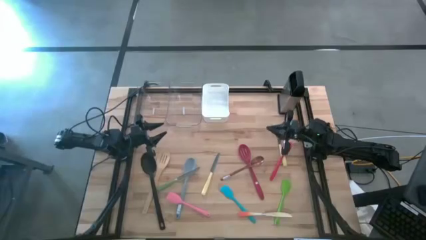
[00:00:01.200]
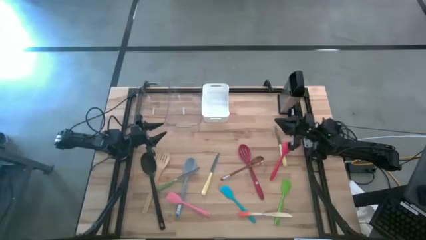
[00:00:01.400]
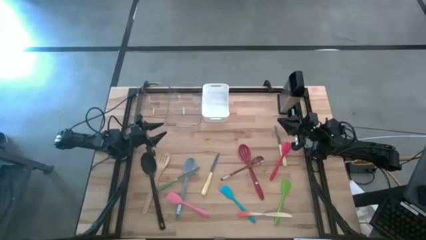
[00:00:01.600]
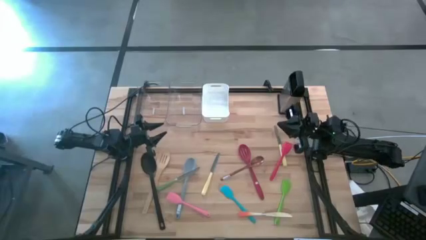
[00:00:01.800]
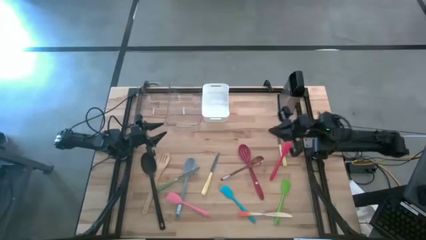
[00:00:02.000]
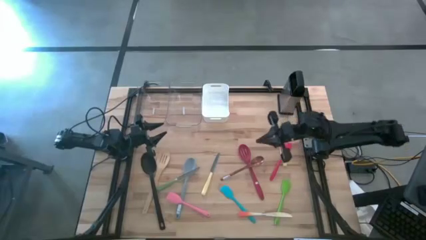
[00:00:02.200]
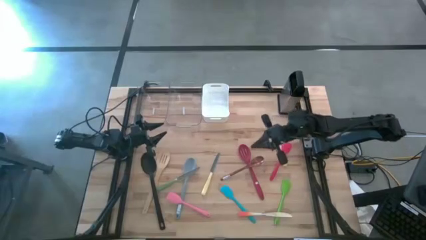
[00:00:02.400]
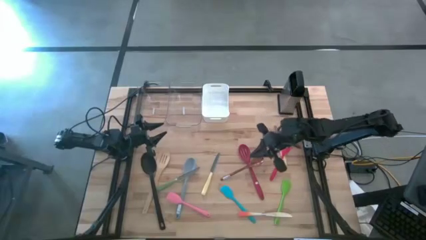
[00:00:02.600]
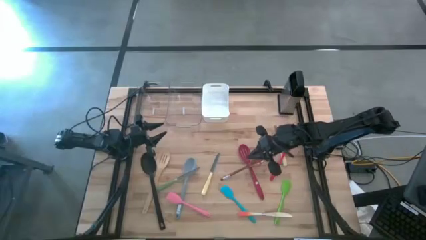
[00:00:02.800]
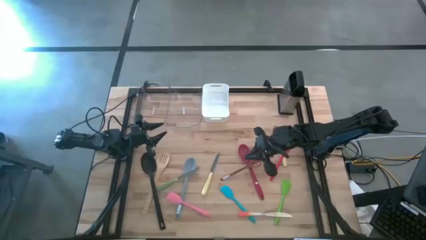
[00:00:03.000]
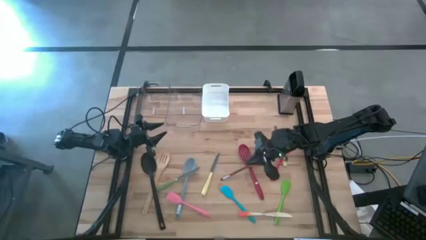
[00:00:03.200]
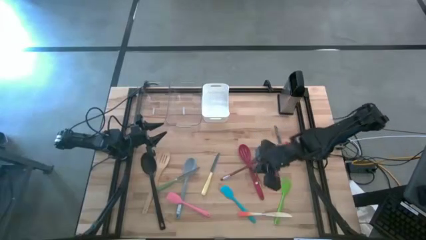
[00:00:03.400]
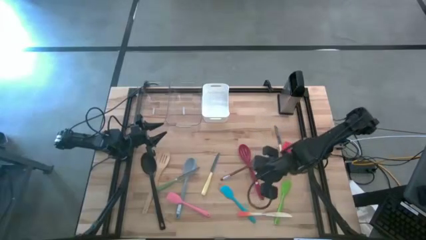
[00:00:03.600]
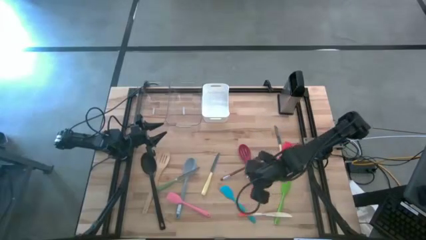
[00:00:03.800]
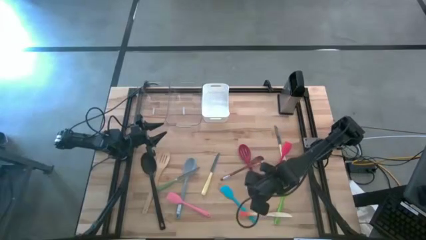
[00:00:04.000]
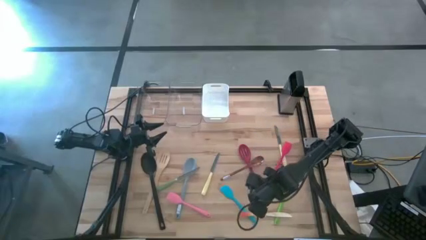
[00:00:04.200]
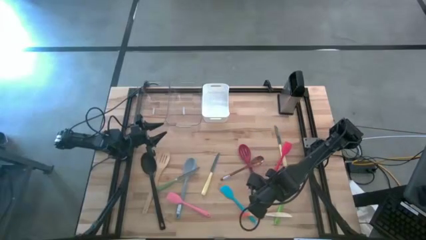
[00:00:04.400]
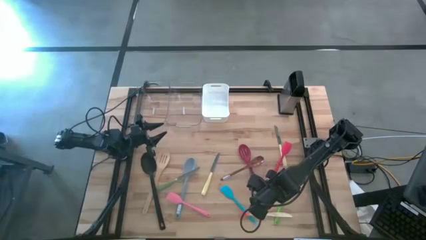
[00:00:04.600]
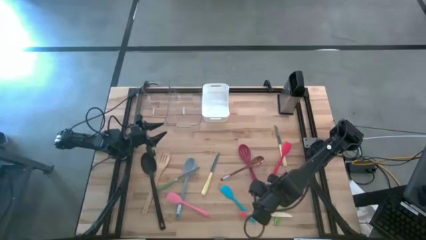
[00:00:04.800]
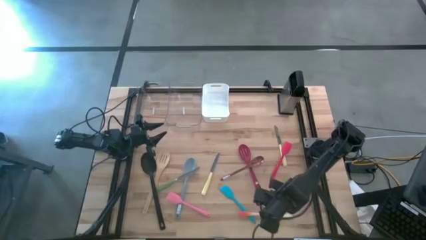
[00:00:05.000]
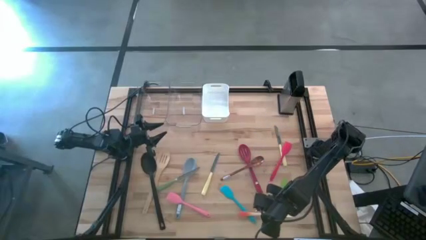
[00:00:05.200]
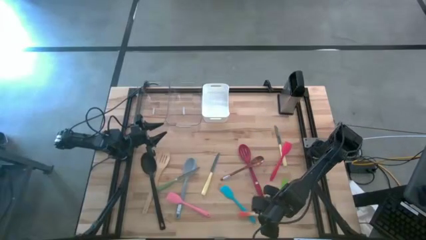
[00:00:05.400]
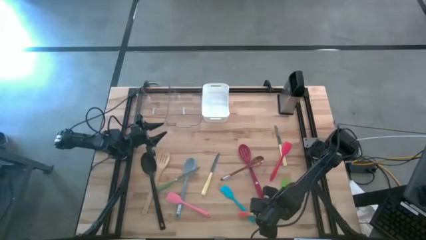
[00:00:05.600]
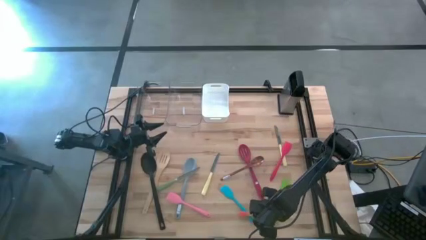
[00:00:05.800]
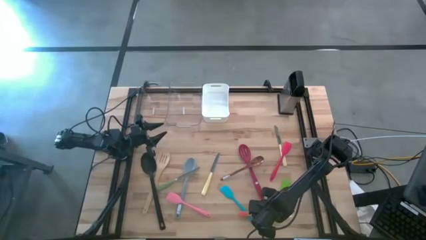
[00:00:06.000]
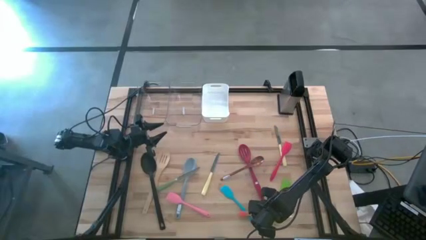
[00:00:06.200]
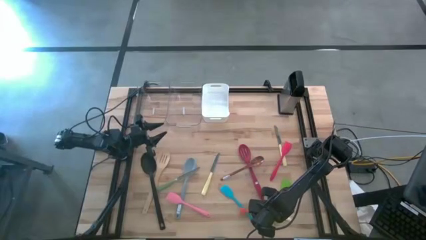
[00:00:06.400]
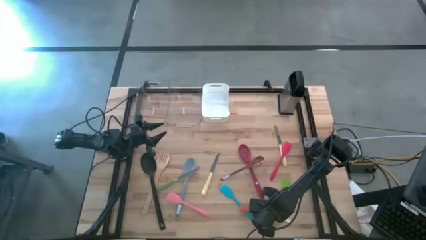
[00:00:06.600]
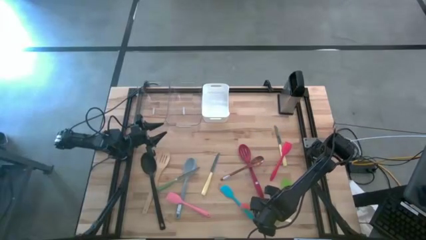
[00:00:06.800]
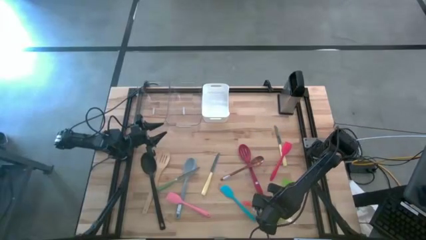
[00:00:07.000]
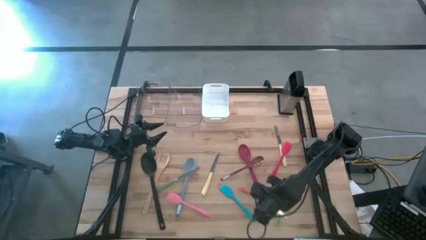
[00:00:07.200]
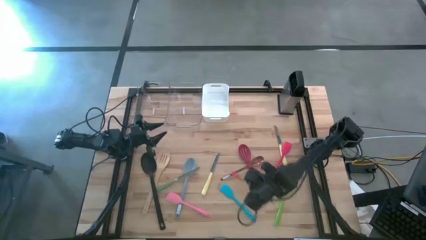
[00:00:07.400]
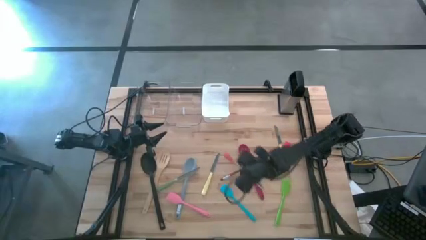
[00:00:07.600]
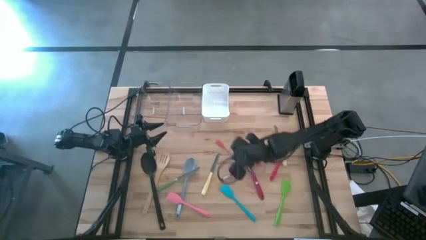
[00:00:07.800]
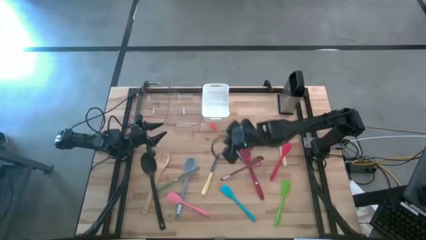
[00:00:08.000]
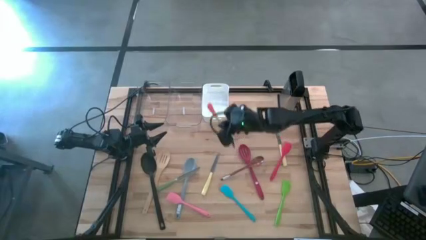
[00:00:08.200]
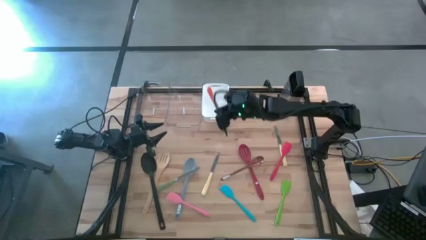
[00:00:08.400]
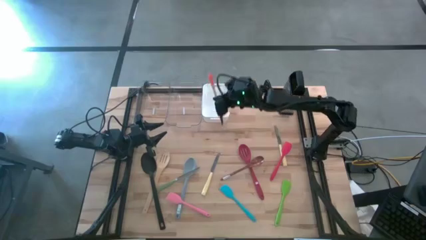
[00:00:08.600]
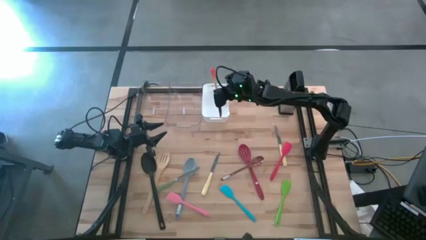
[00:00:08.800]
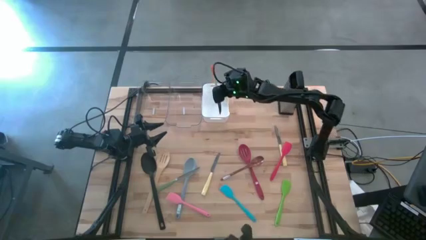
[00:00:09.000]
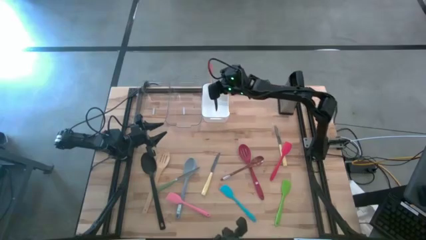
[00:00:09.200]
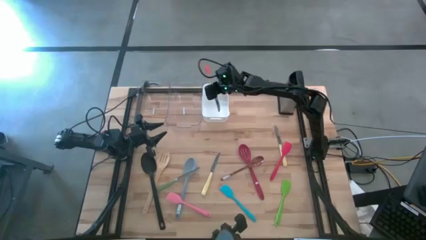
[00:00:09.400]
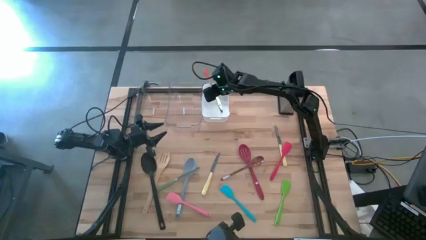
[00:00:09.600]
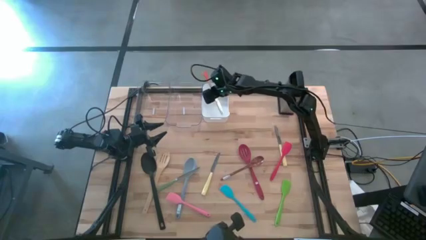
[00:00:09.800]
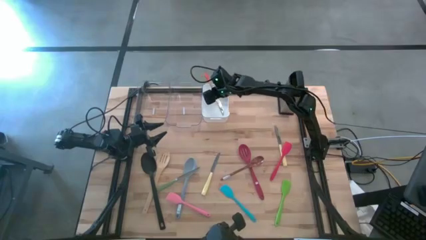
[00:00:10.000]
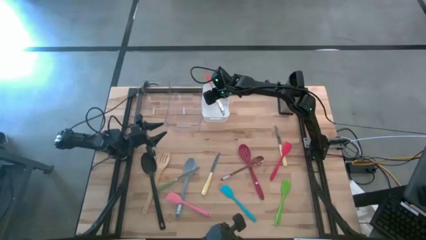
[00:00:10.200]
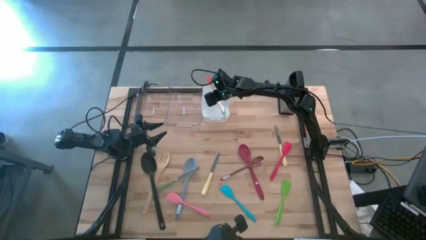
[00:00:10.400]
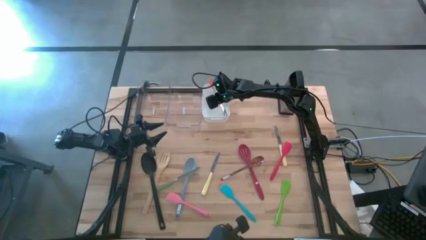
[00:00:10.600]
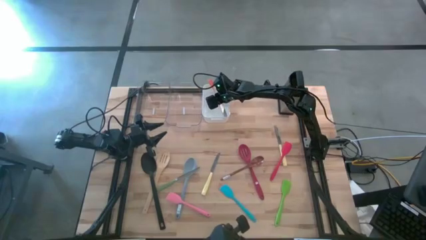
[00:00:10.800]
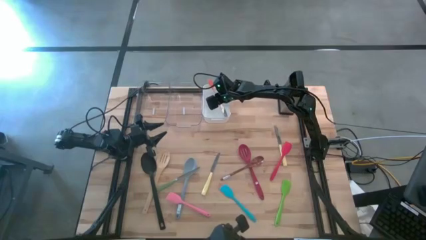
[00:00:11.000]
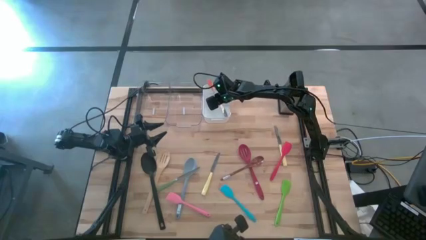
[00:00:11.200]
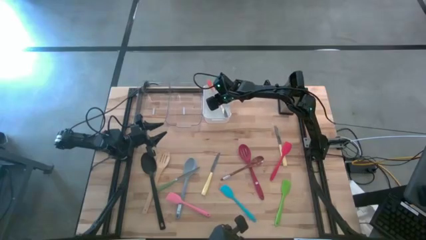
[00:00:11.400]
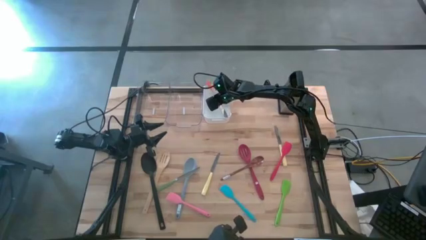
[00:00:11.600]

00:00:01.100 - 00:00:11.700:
Task: Pick & Place Kitchen Items
Put the orange table knife into the white bin
